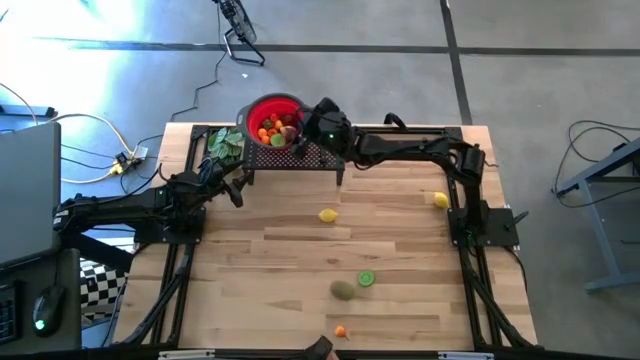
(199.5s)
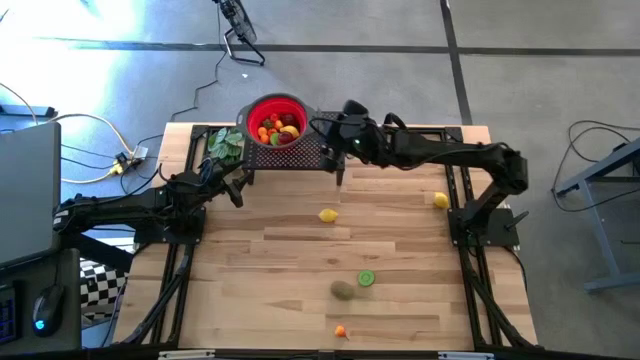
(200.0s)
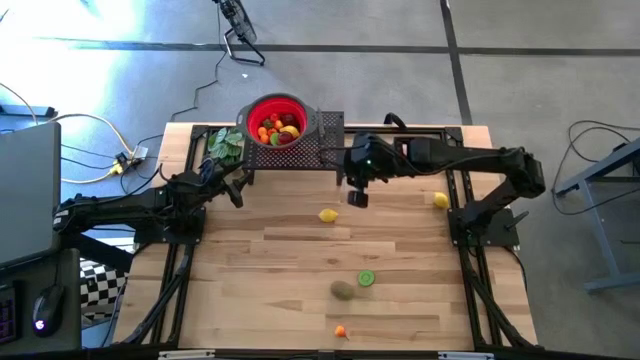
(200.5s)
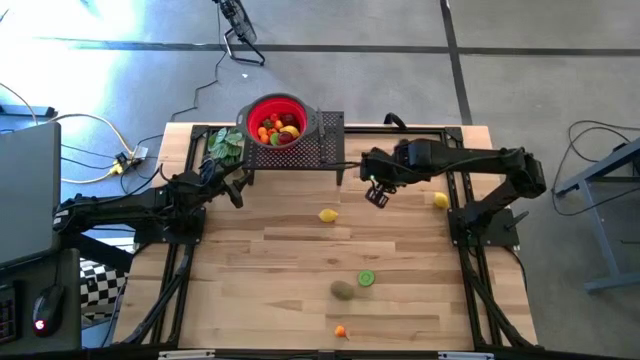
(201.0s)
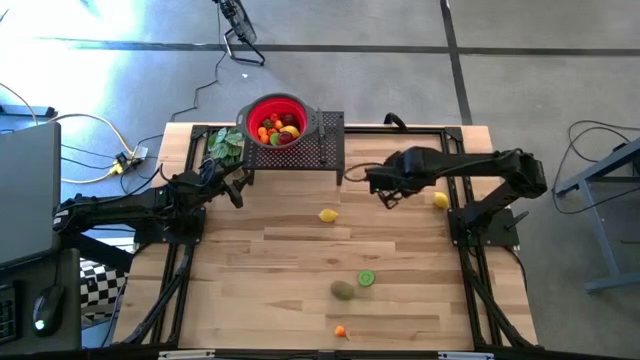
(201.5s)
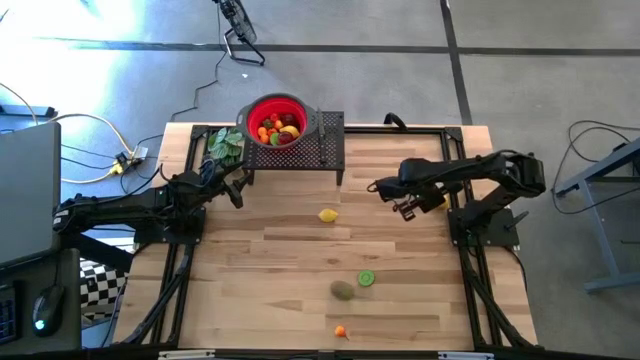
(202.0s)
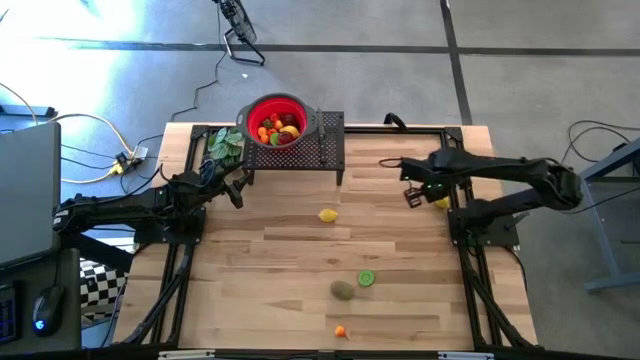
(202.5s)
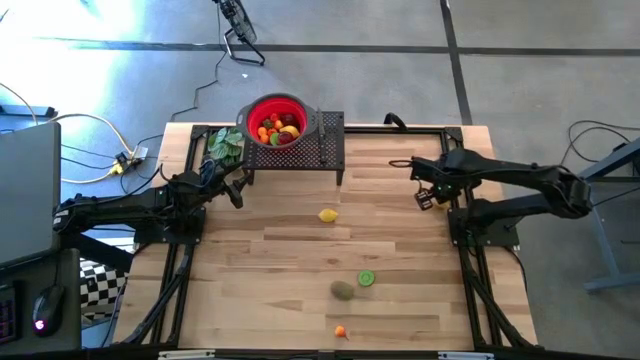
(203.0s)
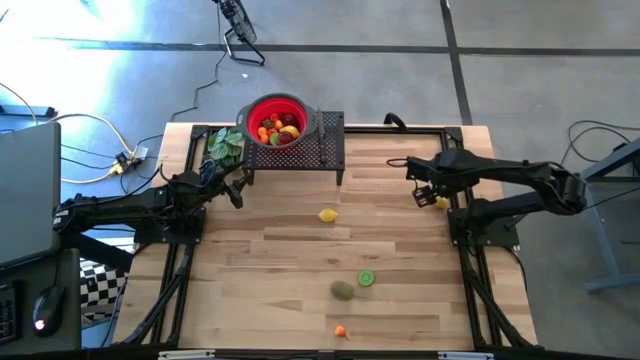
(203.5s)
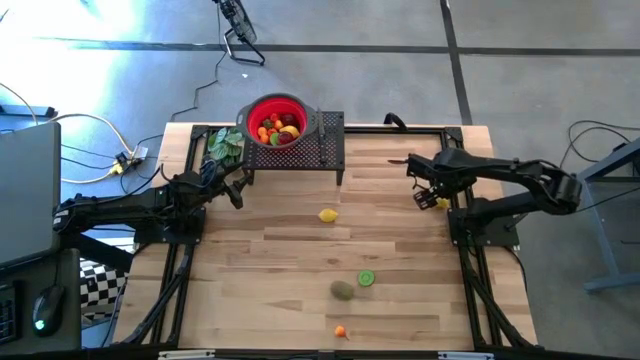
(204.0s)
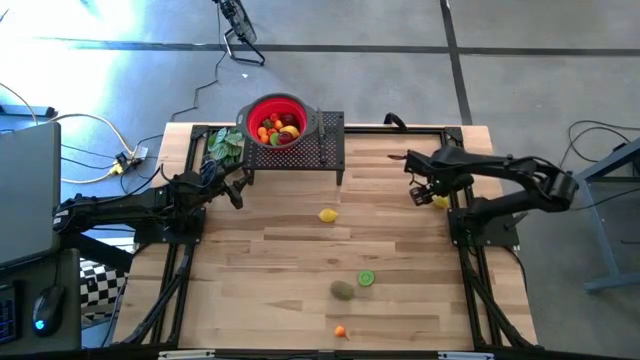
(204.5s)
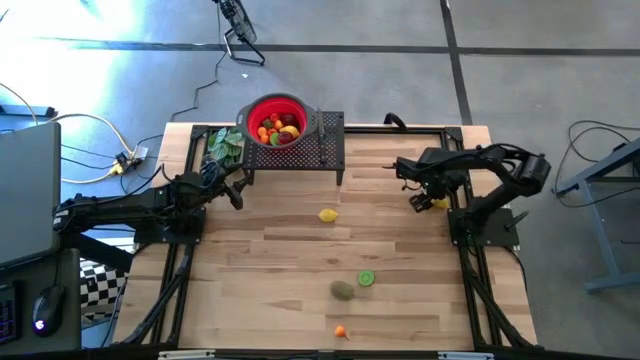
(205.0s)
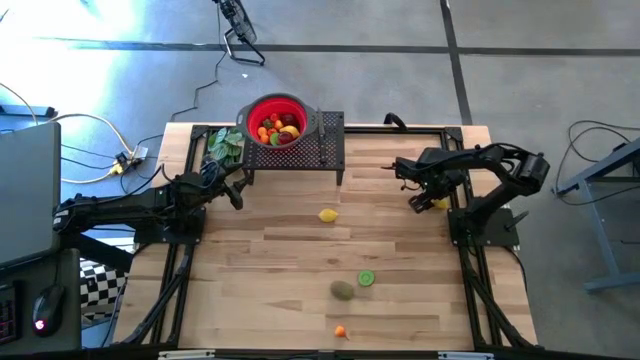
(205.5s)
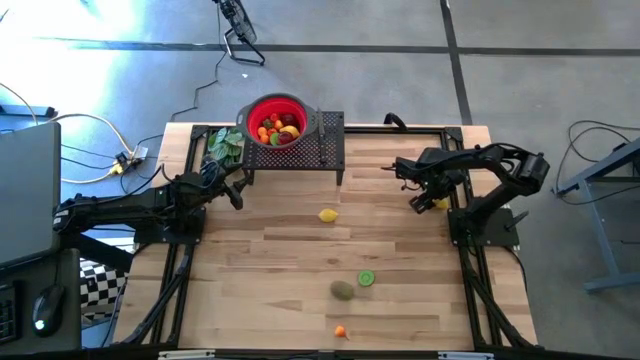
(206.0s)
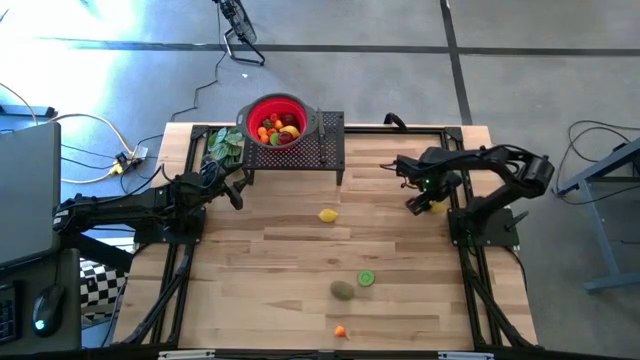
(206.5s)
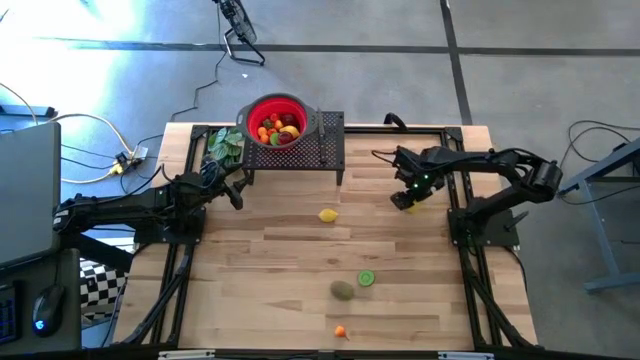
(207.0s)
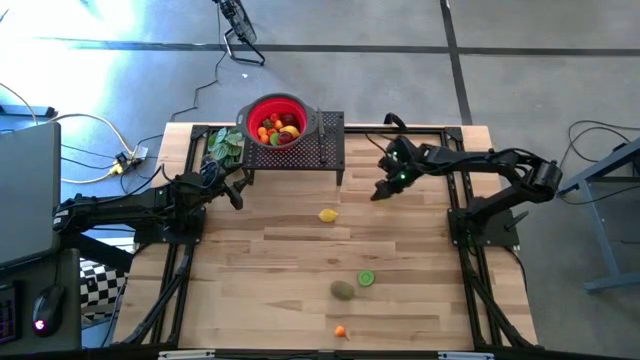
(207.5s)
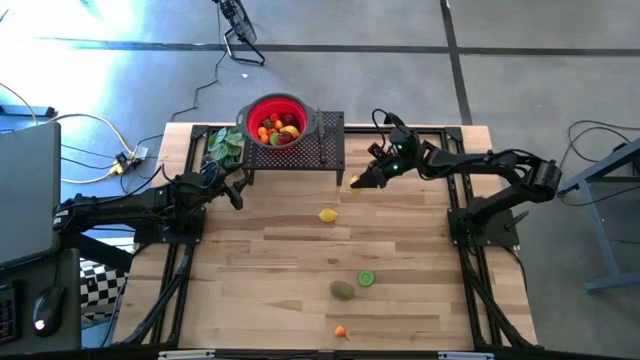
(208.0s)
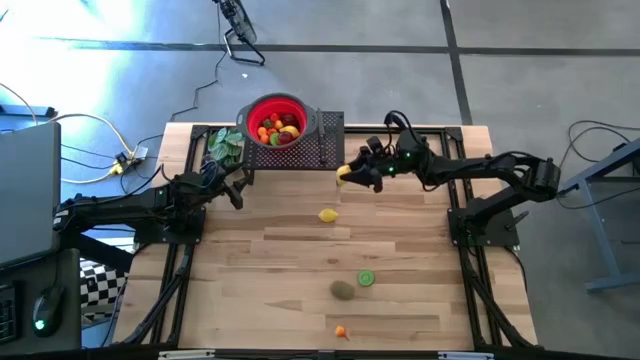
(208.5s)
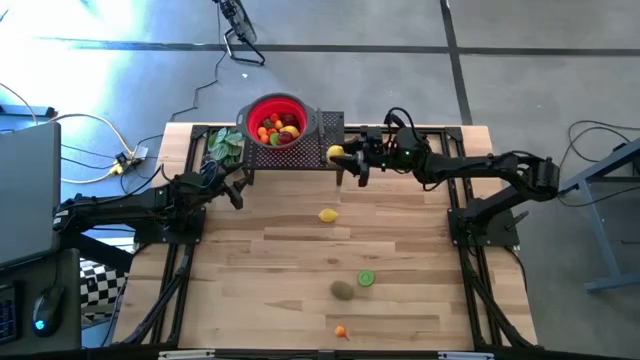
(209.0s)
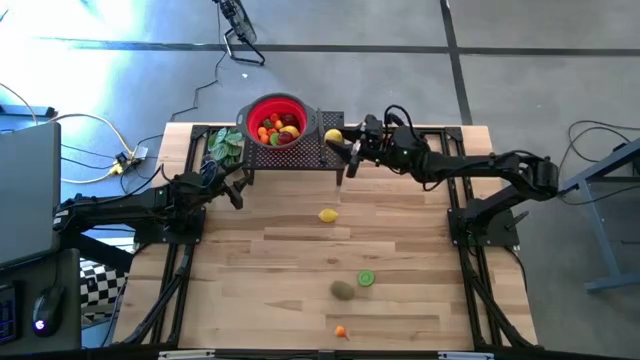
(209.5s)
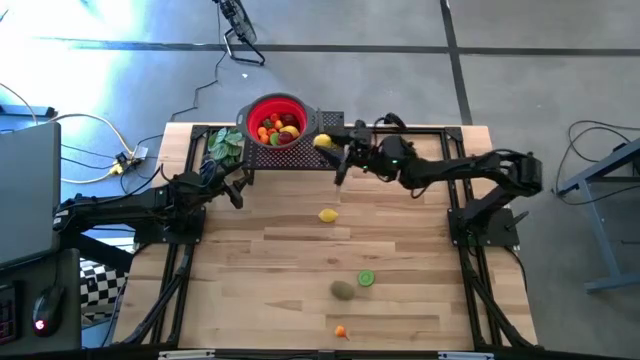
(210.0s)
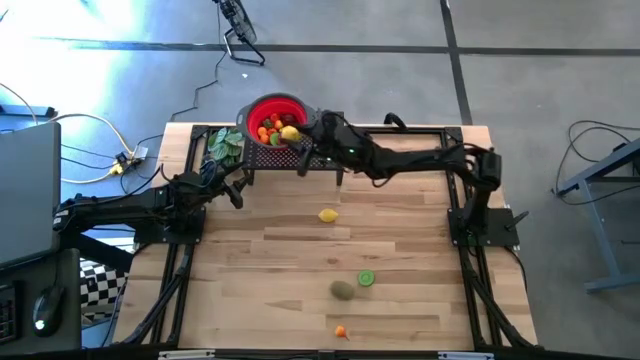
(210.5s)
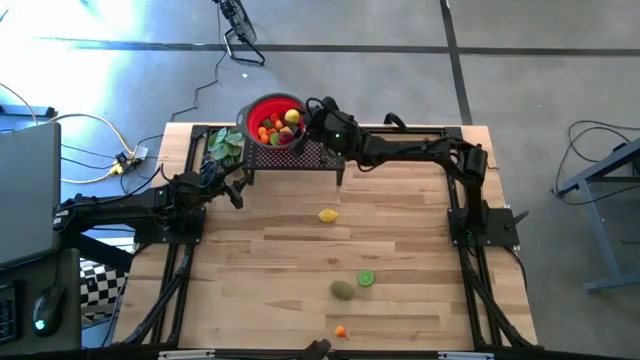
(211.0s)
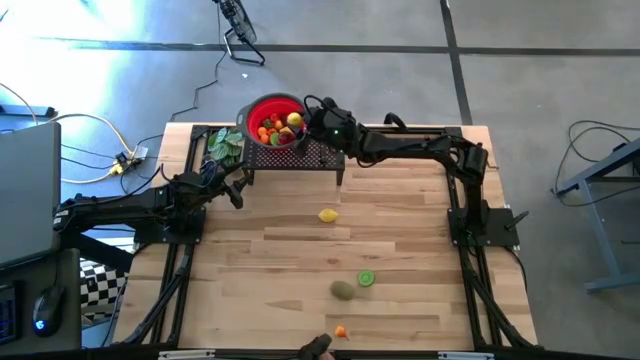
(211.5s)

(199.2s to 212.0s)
Task: Pick & Place Fruit
Put the yellow lemon into the red strainer bowl on the shelf

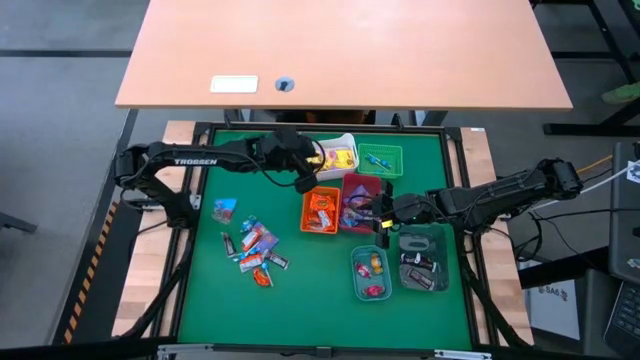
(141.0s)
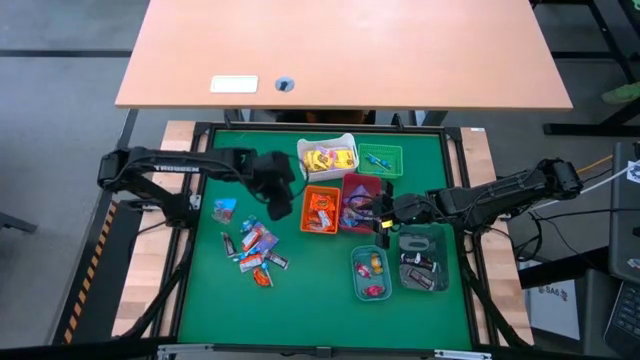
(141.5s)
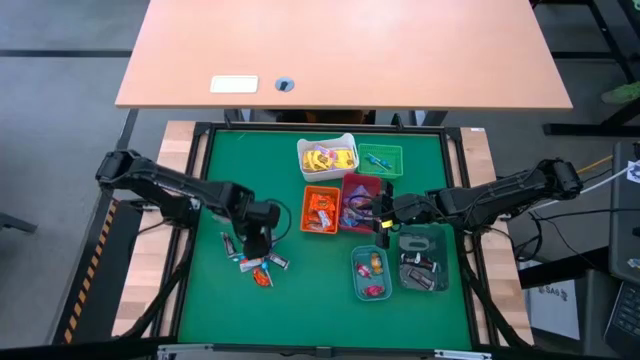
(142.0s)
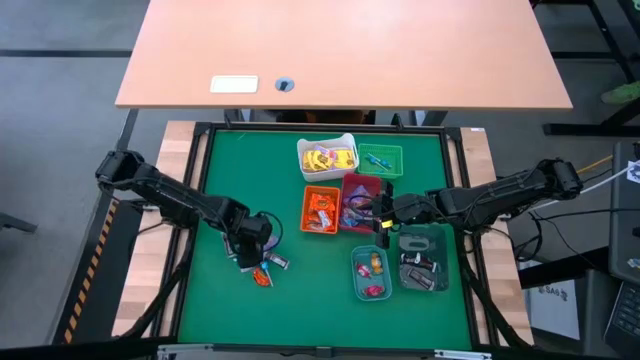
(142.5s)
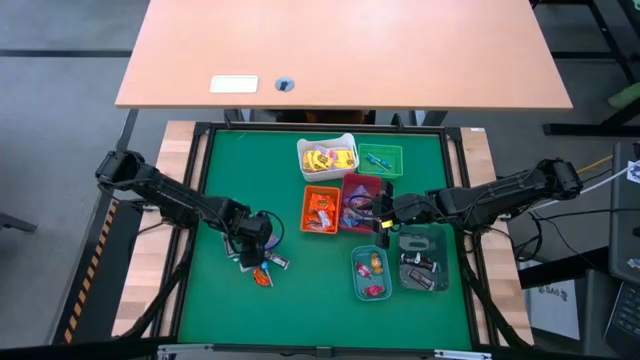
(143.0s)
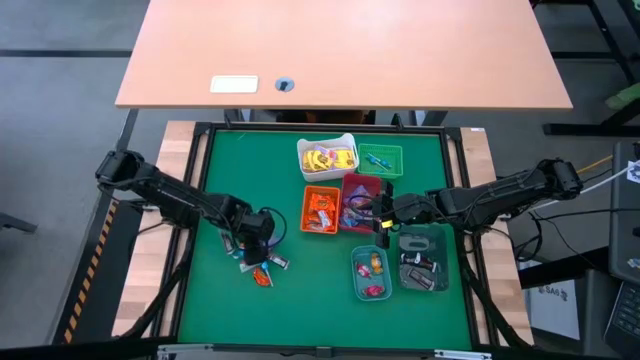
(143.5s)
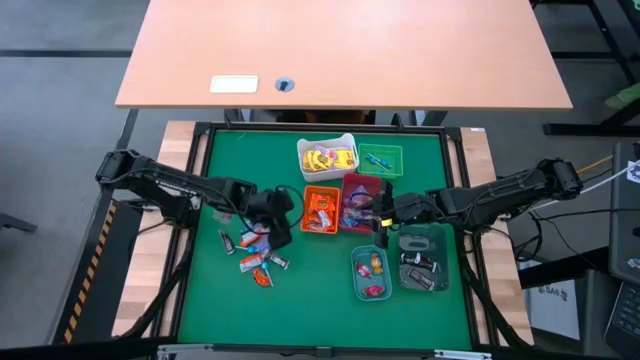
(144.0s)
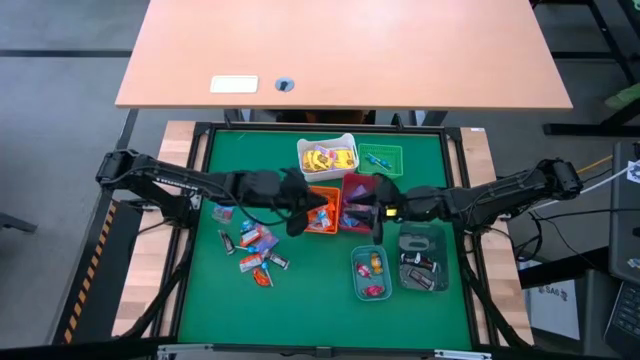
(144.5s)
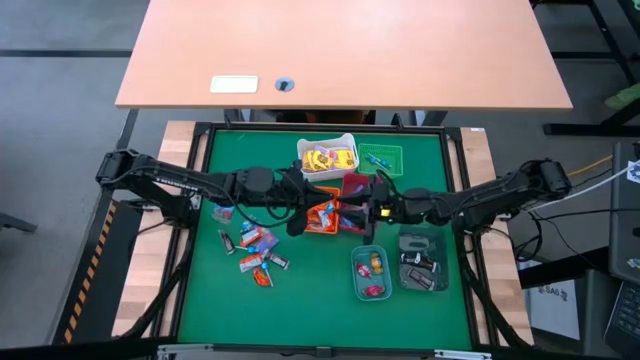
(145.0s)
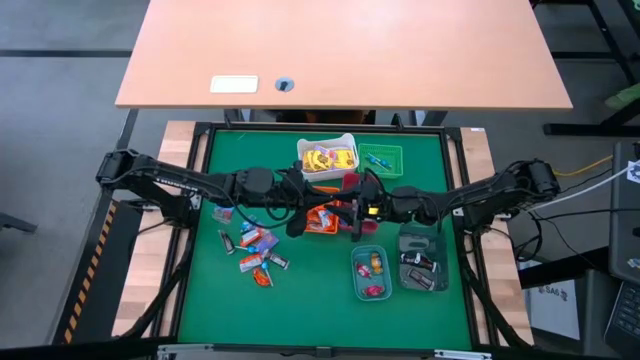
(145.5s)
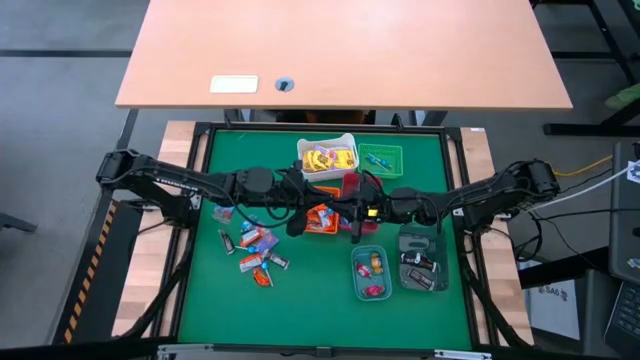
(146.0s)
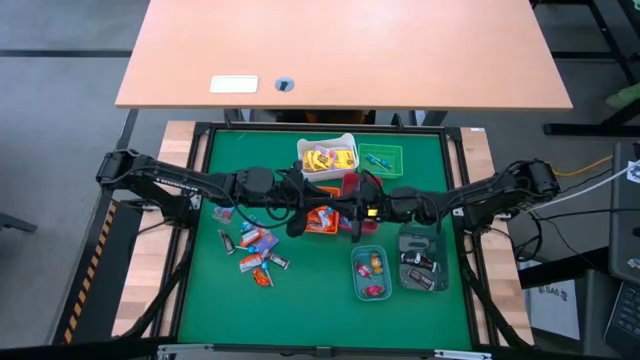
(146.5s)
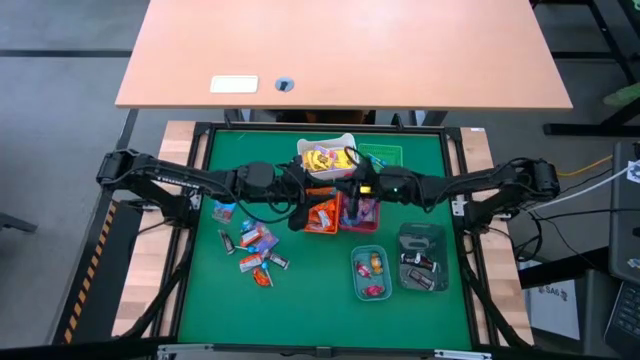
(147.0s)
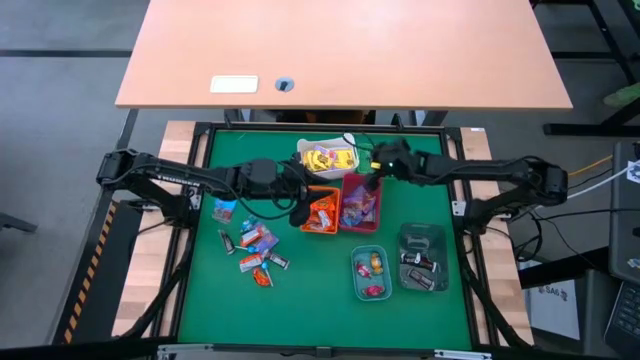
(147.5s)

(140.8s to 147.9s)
Task: Sort candy
Put the blue lollipop into the green basket
